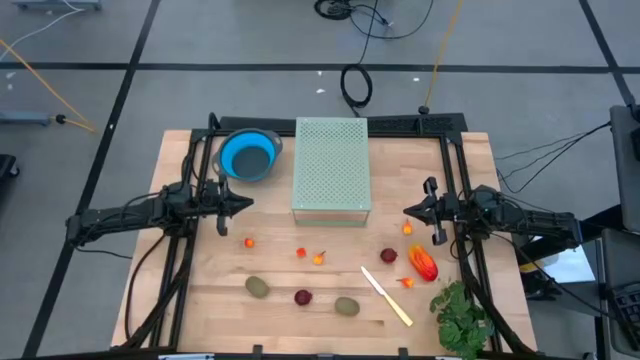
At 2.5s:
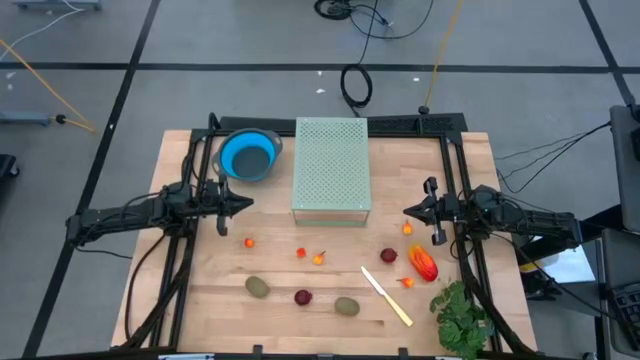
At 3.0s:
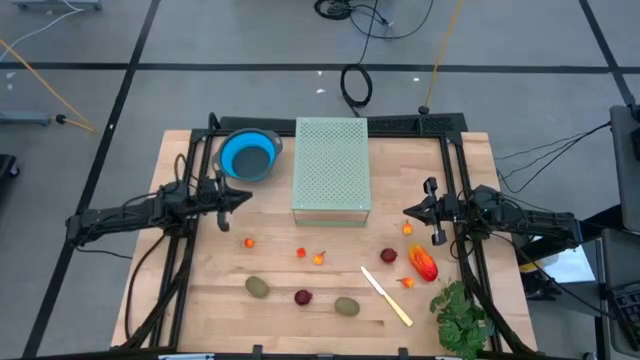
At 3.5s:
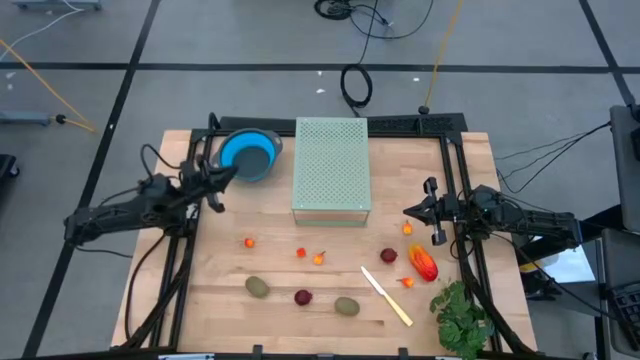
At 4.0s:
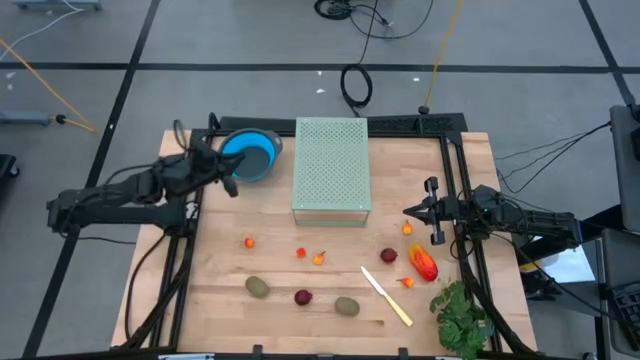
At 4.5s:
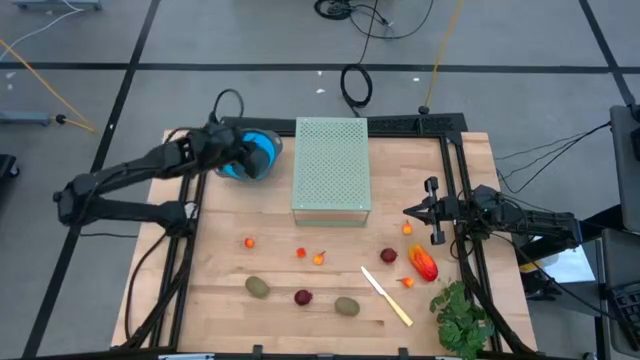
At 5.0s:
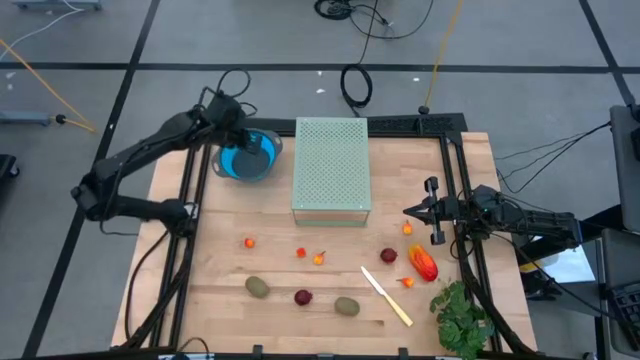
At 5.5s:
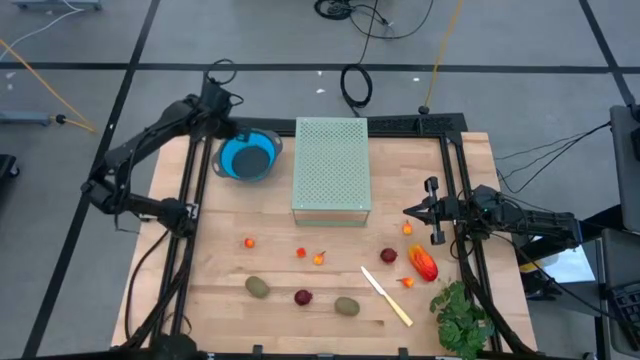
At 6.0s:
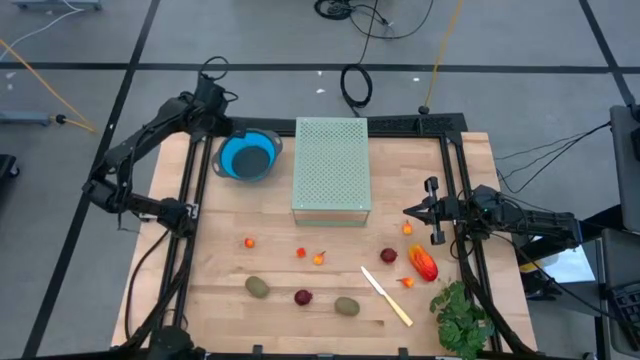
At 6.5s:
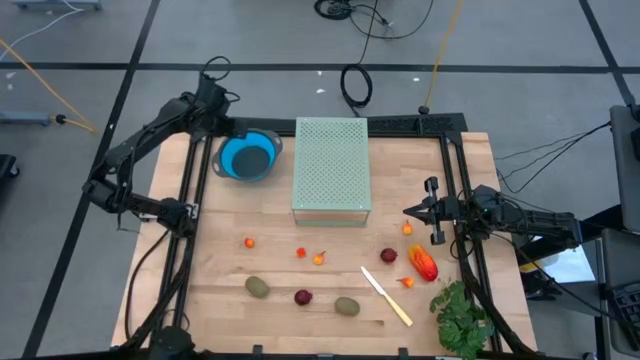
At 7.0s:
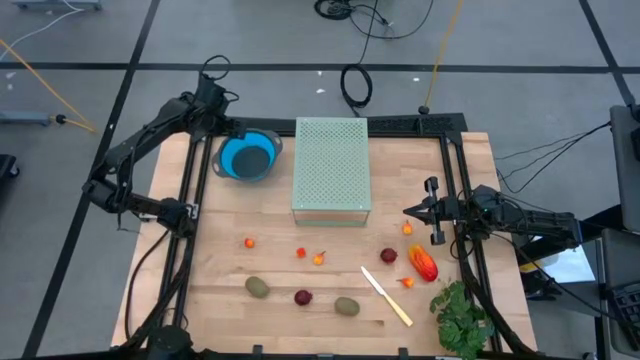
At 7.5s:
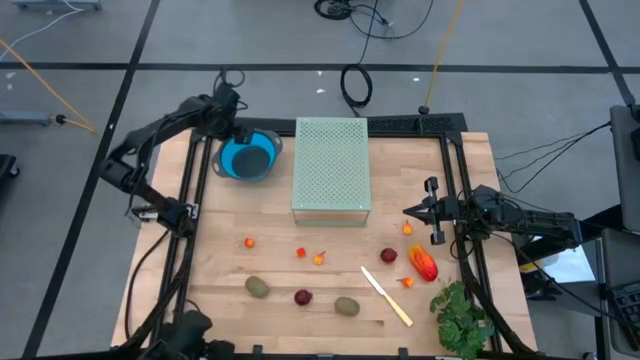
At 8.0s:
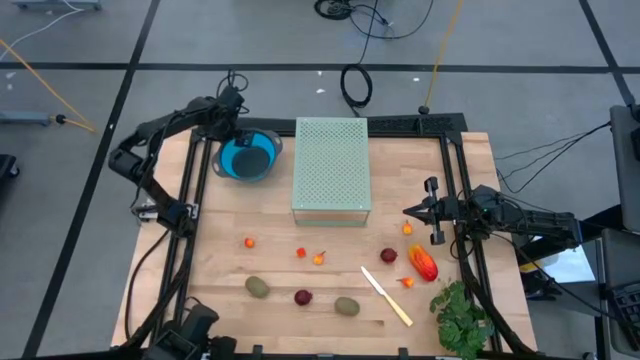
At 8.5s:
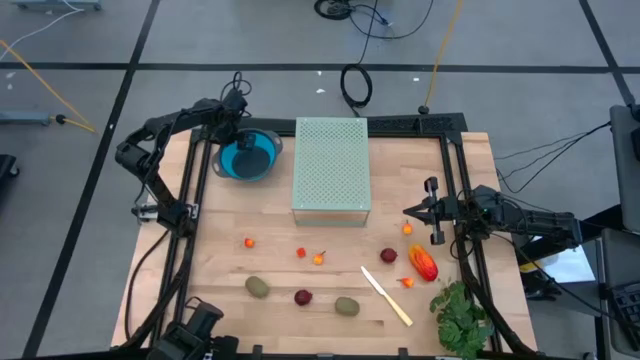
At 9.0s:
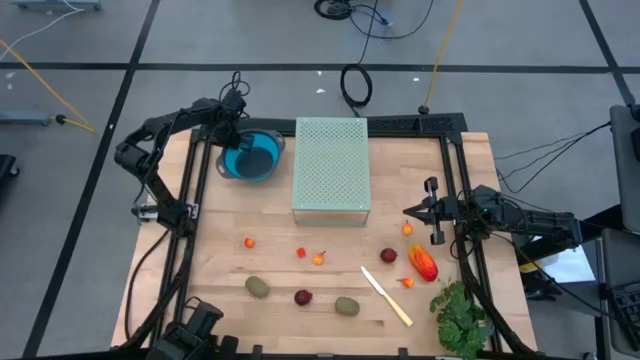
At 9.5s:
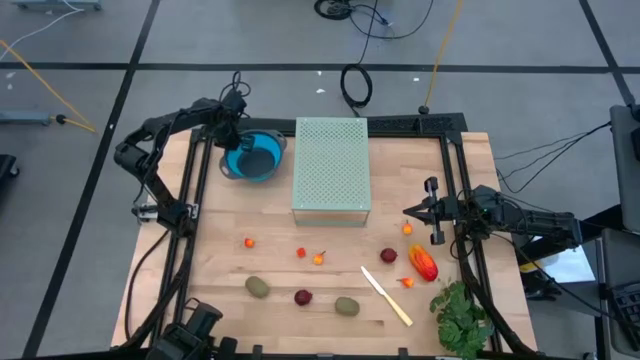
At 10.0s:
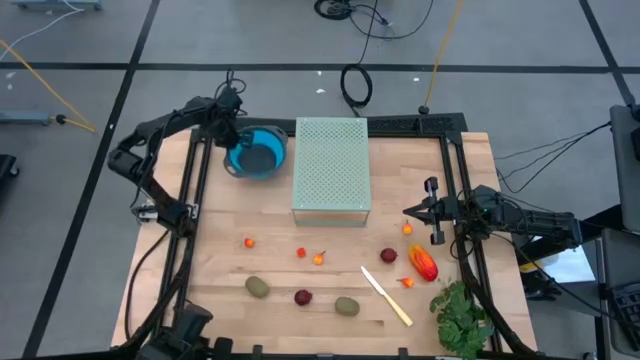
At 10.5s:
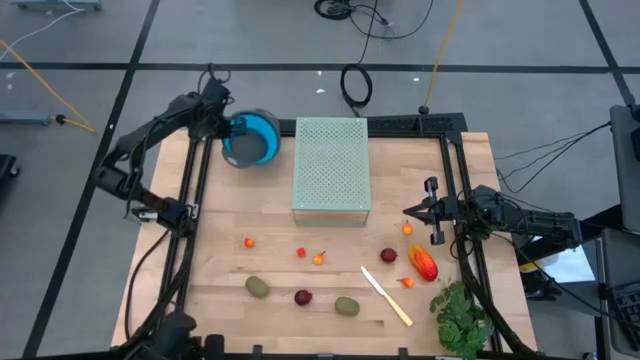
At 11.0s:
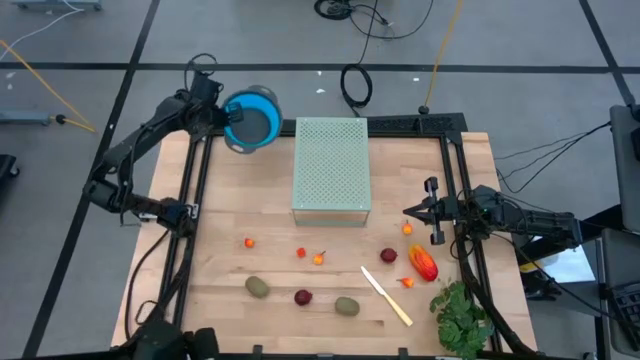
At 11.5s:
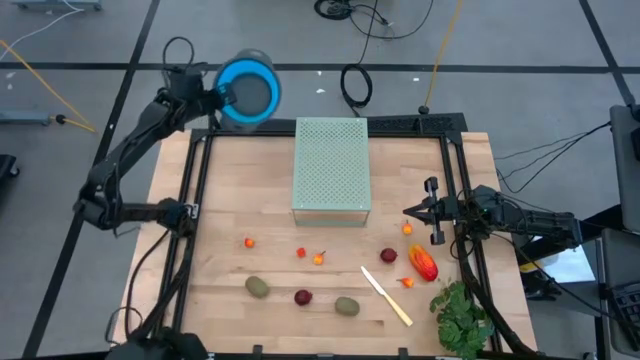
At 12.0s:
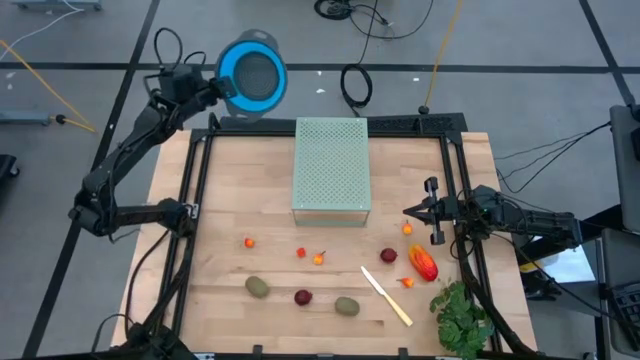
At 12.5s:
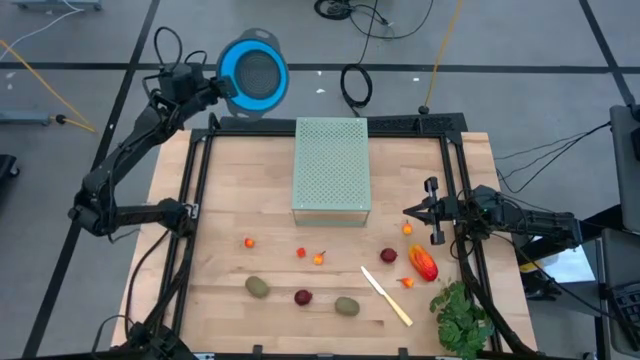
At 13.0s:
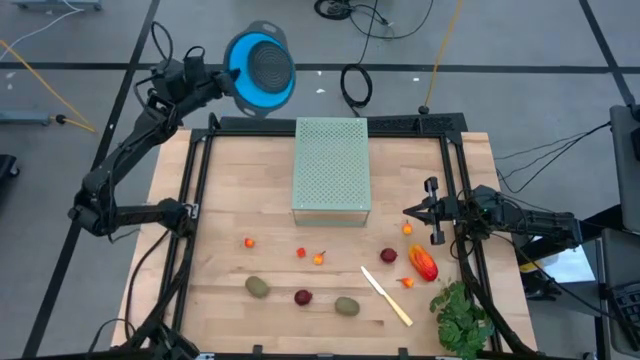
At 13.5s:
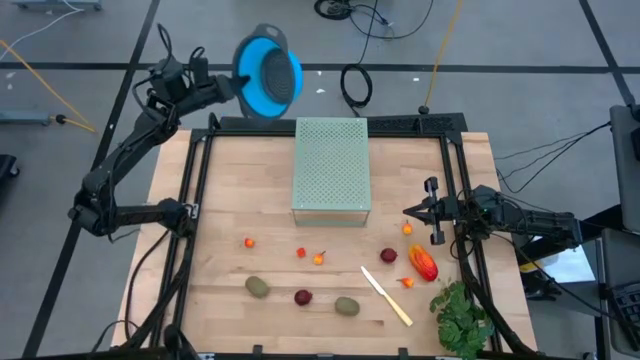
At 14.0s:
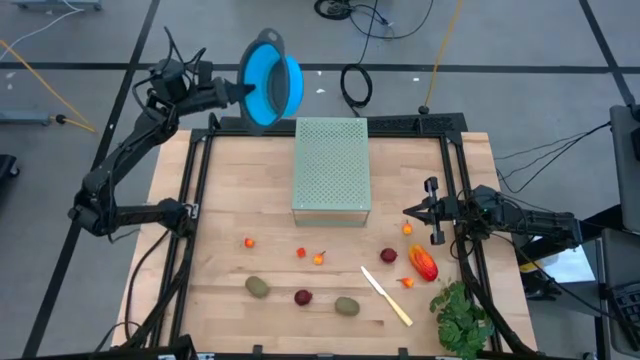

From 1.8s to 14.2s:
Task: Pick & Place Fruit
Put the blue strainer bowl on the shelf

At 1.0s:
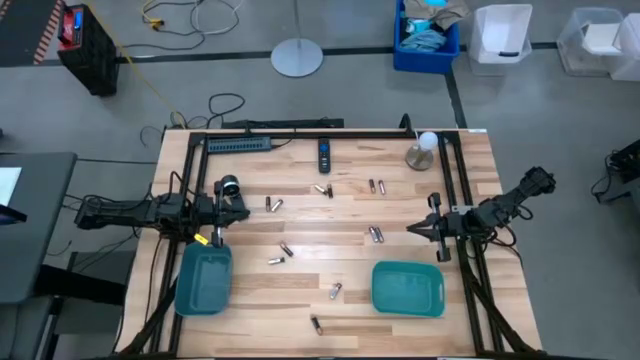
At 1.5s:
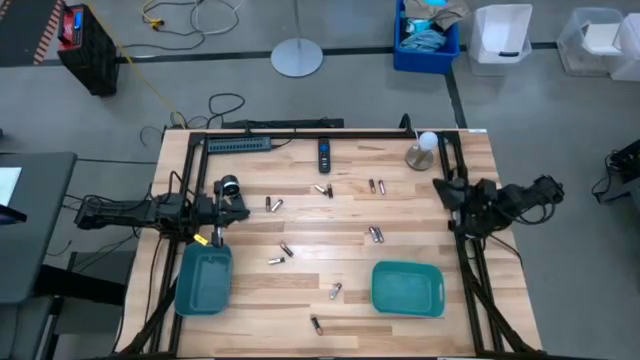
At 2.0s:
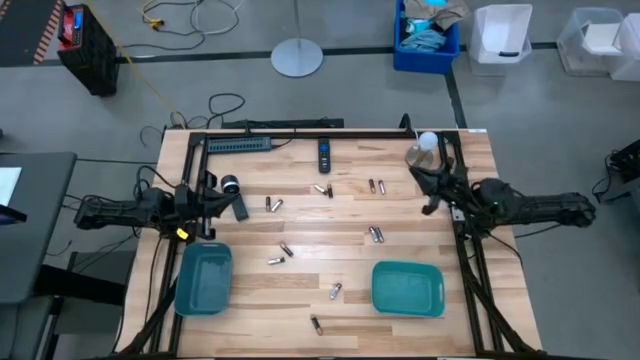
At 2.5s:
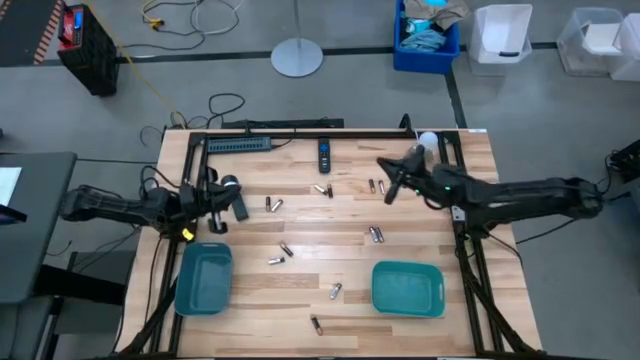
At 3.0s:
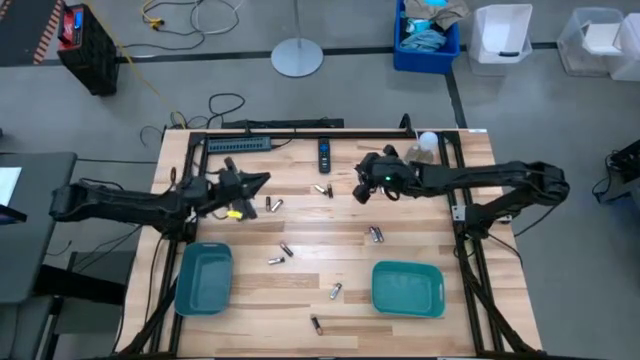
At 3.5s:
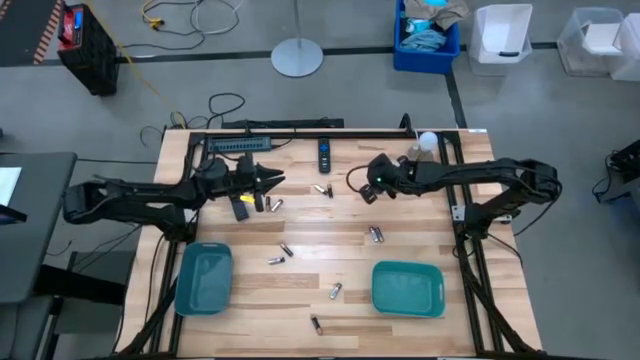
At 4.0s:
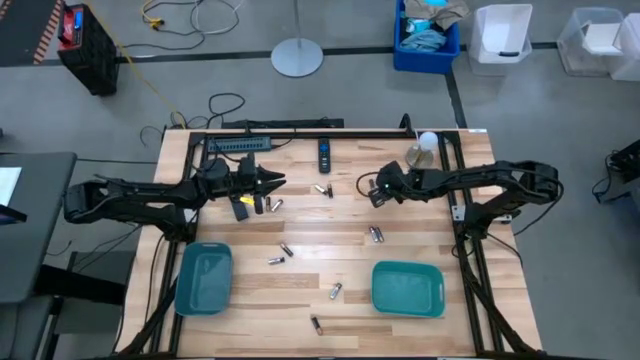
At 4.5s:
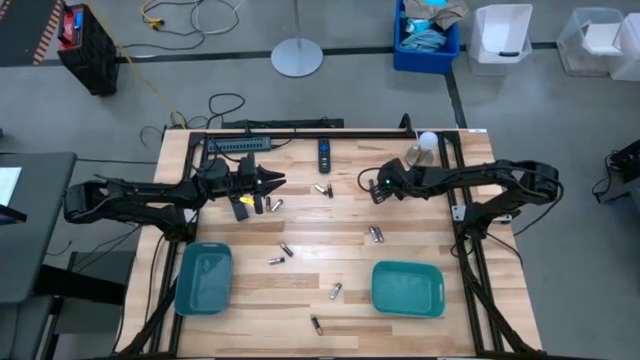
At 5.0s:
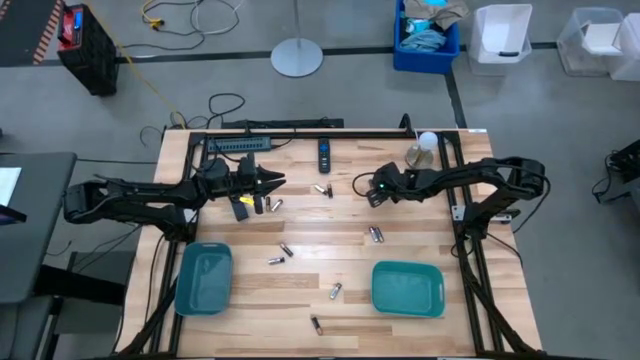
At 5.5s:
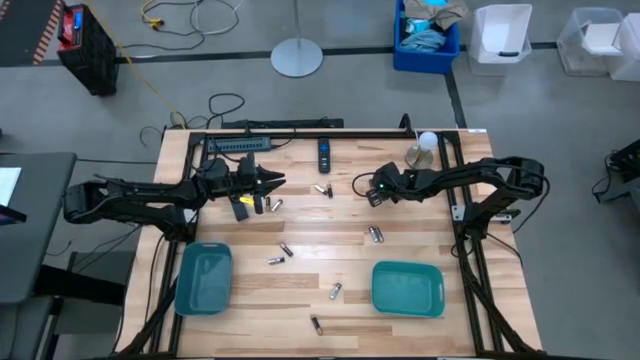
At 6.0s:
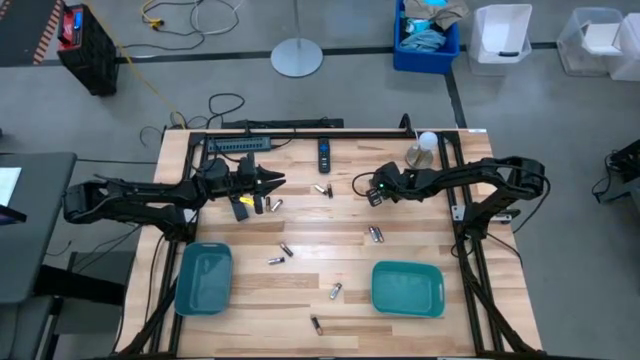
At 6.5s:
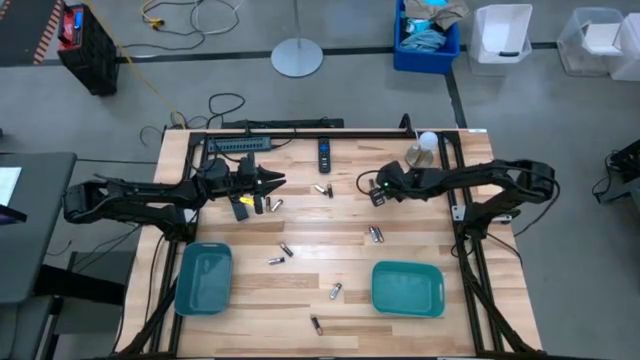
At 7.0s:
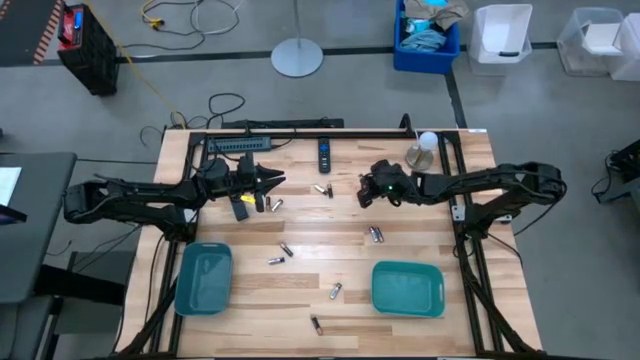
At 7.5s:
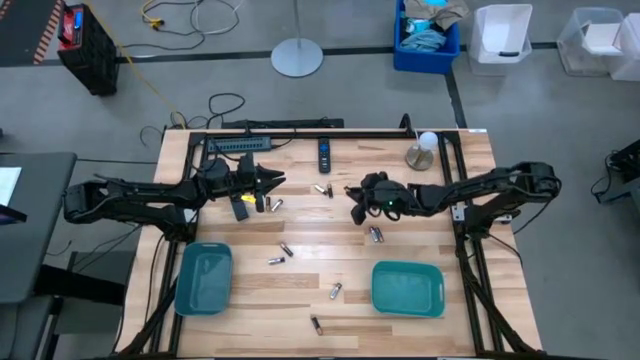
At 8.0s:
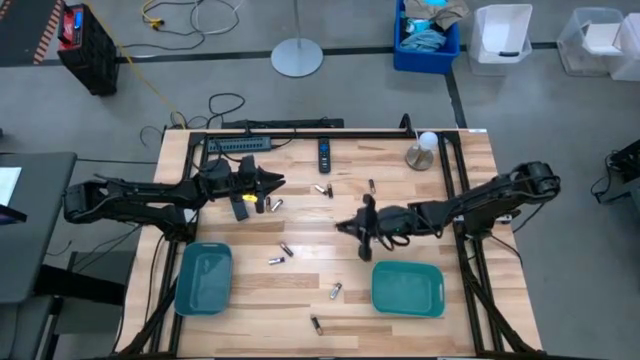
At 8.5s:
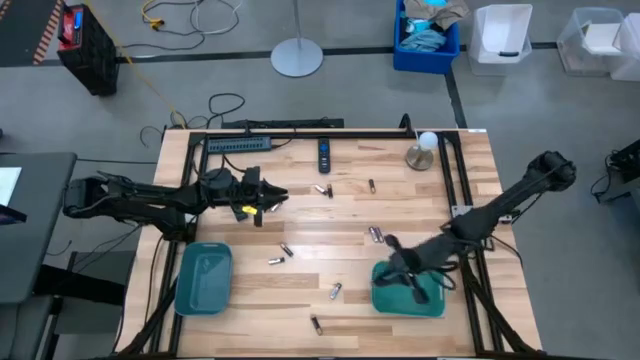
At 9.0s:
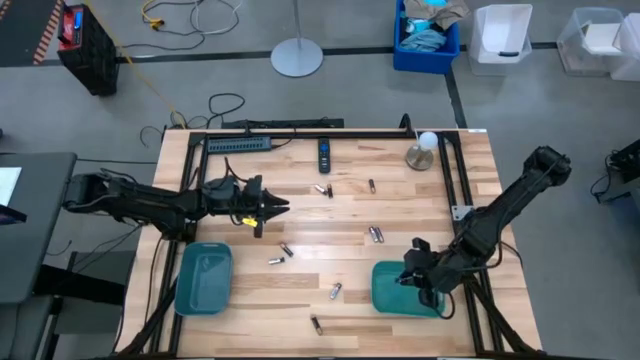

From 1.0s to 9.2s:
Task: Sort batteries
Put the silver battery into the green bin
